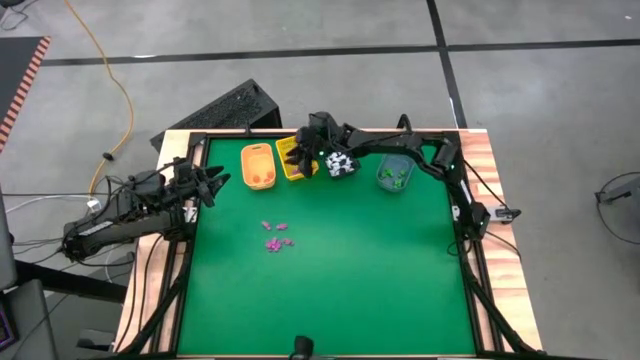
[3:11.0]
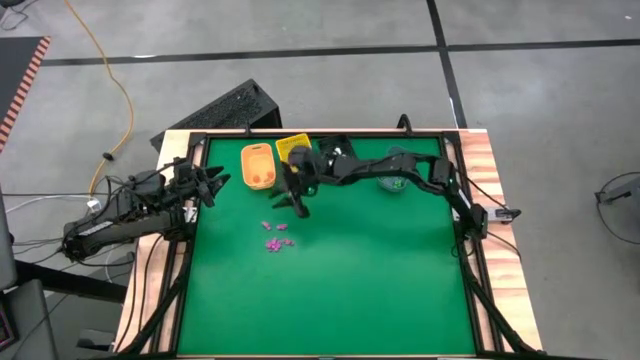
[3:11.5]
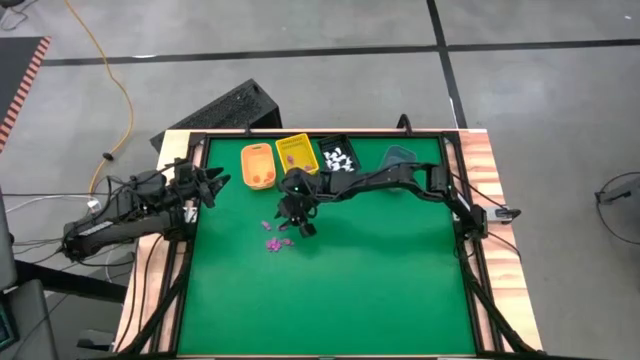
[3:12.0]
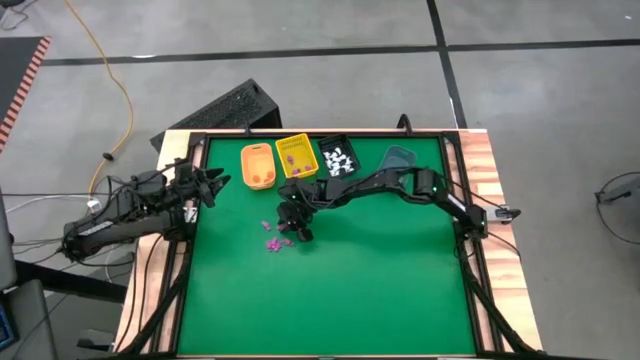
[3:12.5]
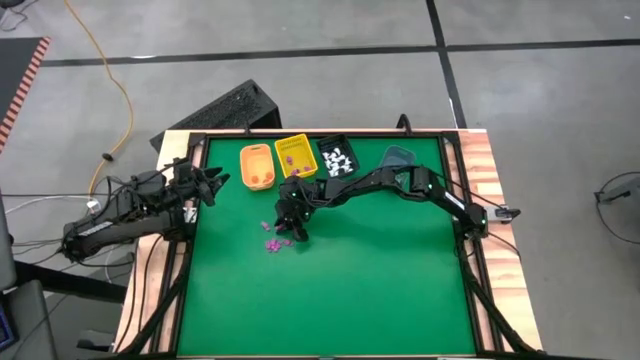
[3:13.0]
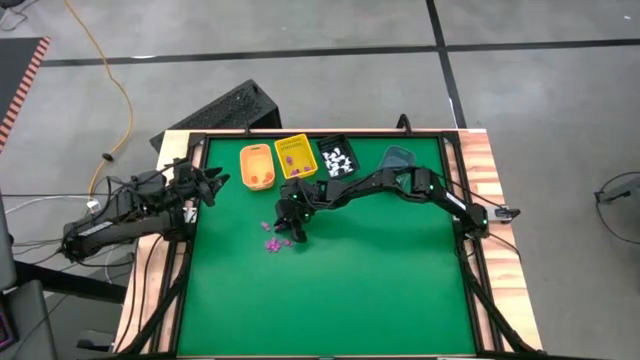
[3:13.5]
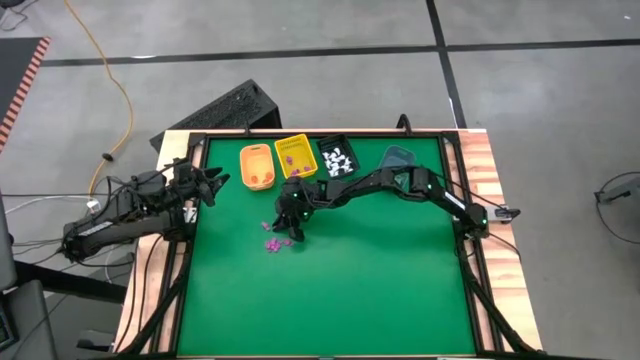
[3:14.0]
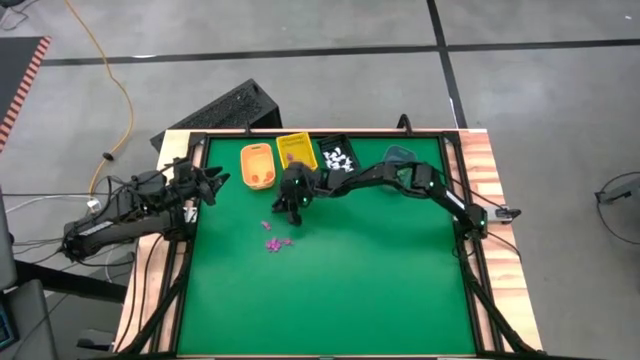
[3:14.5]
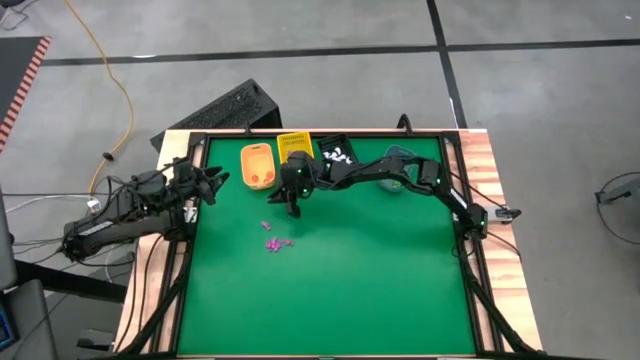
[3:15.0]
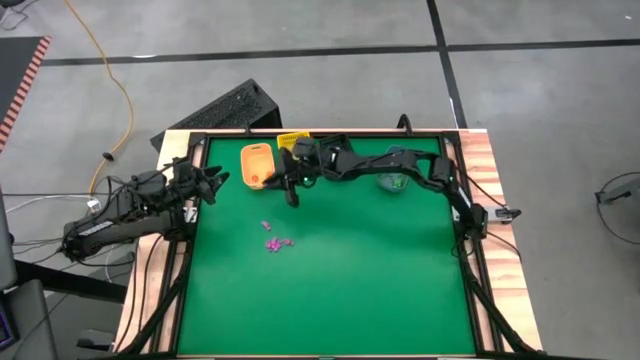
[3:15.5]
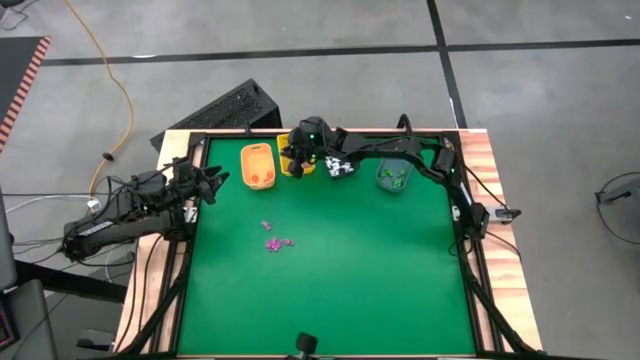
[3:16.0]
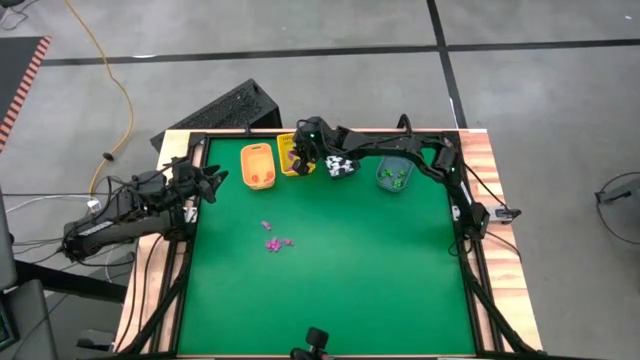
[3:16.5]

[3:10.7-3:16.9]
Task: Sort Halloween decoration
Put the pink skeleton toy into the yellow bin

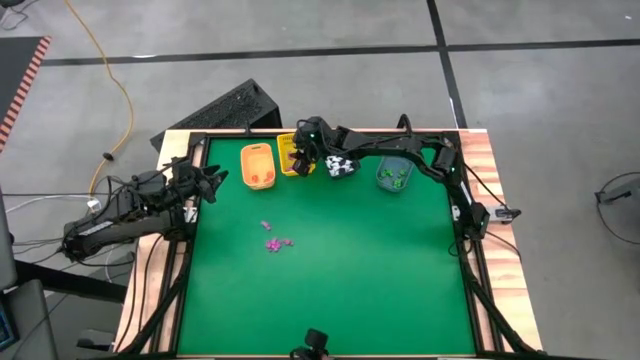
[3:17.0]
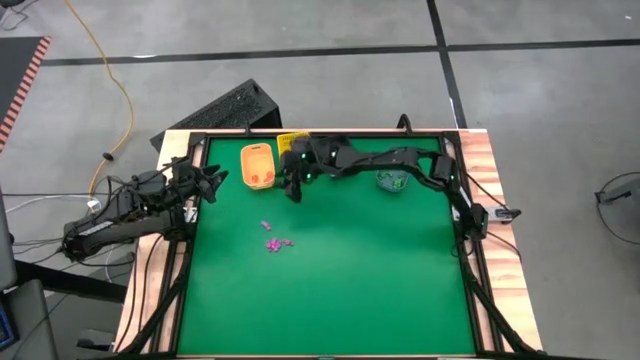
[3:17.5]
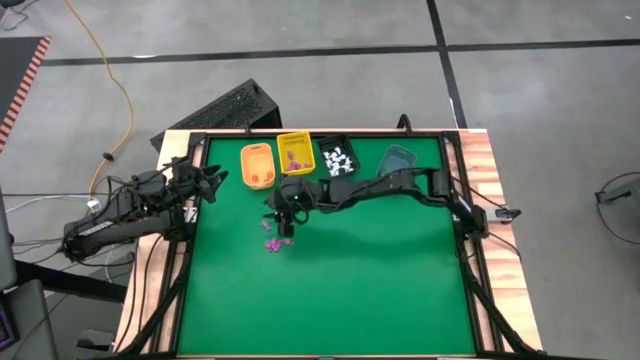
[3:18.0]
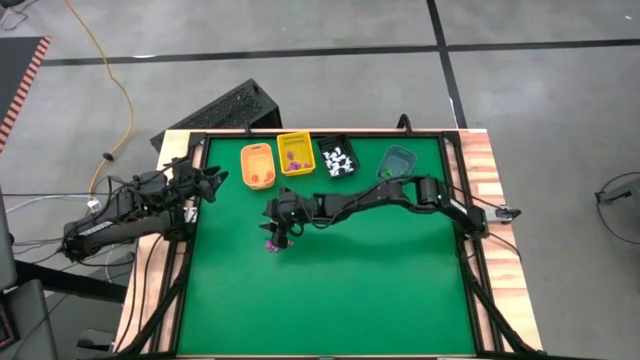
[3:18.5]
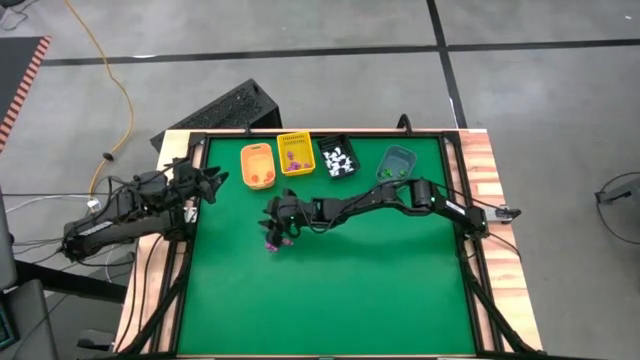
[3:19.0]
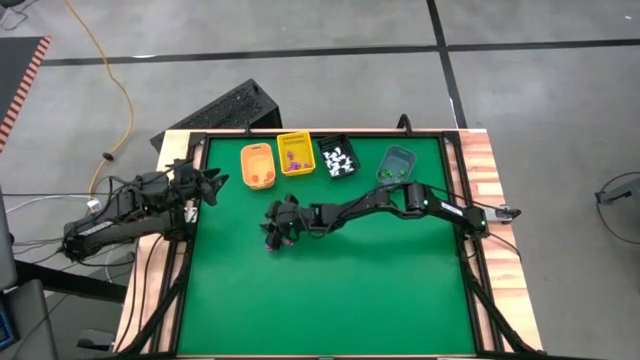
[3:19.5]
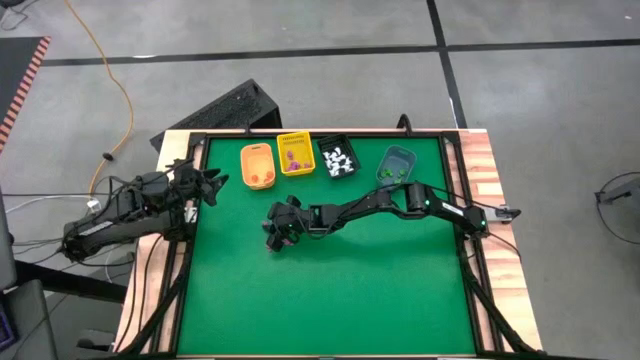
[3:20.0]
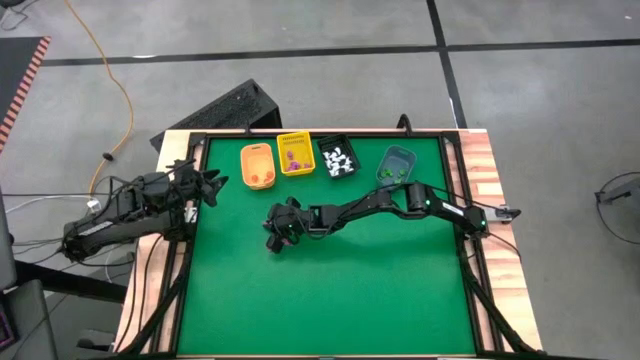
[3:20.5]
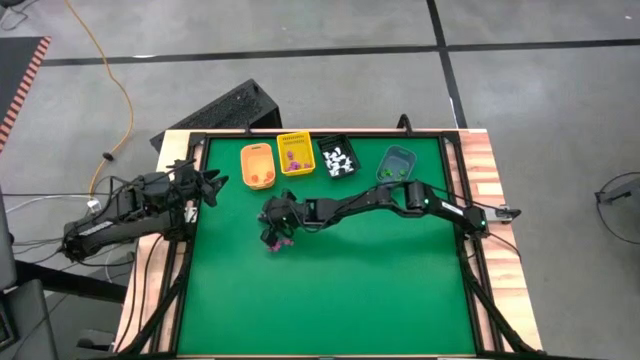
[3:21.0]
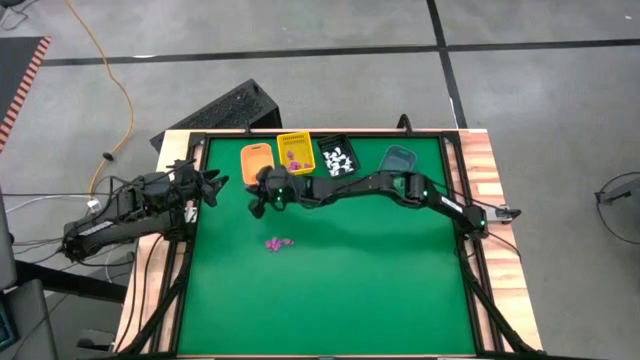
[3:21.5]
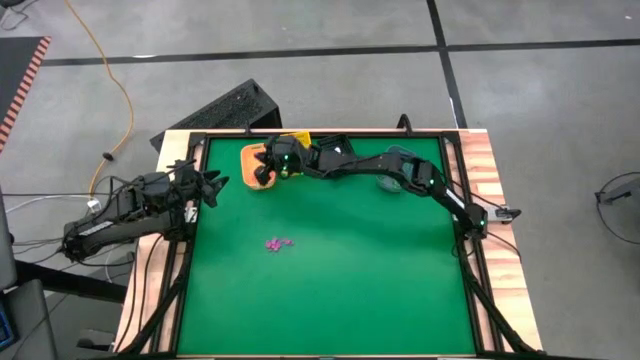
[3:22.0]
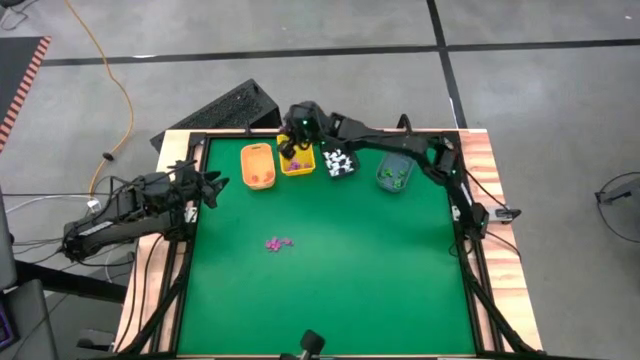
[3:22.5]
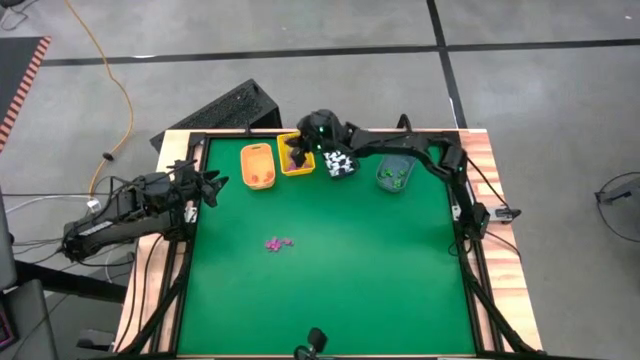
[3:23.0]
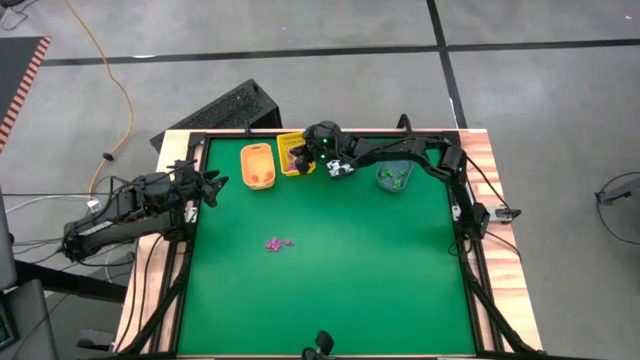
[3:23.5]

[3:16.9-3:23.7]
Put the pink skeleton toy into the yellow bin

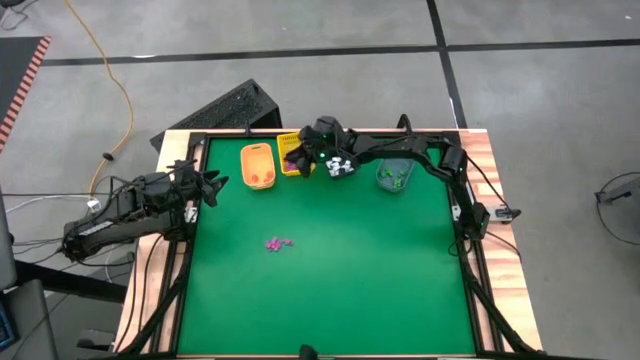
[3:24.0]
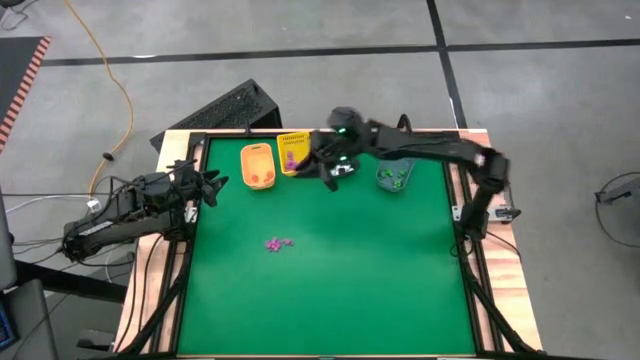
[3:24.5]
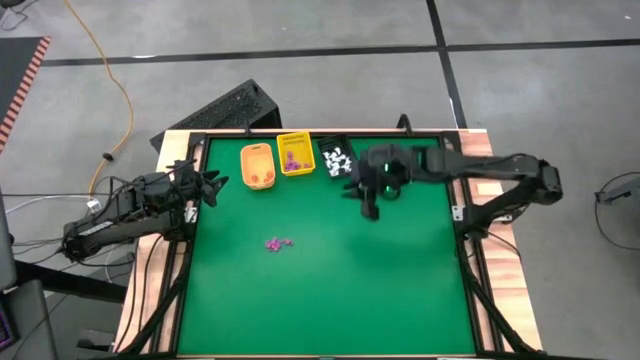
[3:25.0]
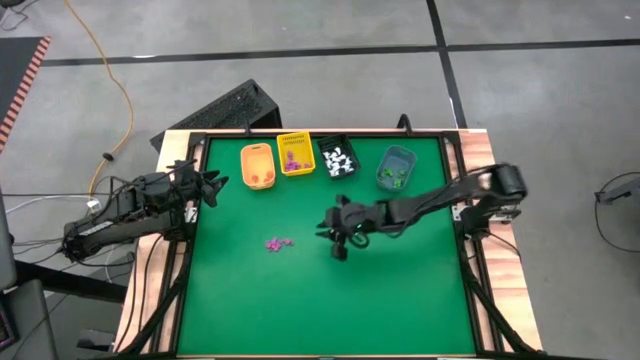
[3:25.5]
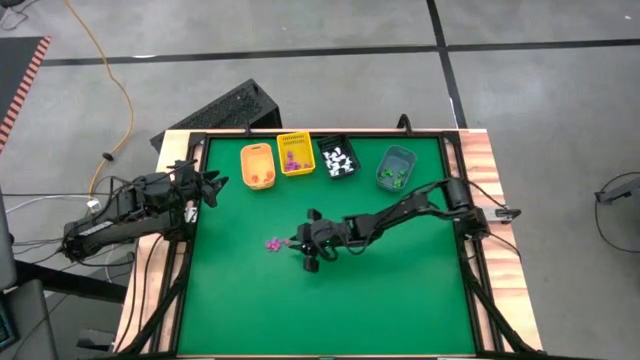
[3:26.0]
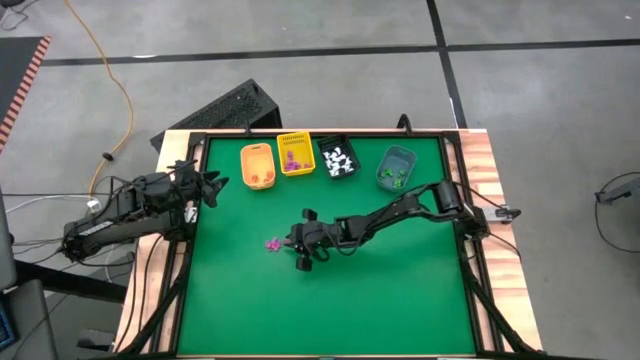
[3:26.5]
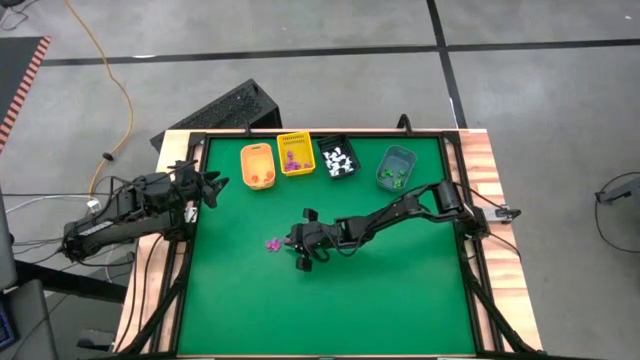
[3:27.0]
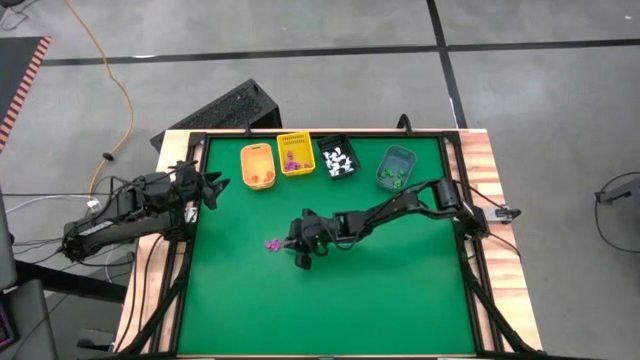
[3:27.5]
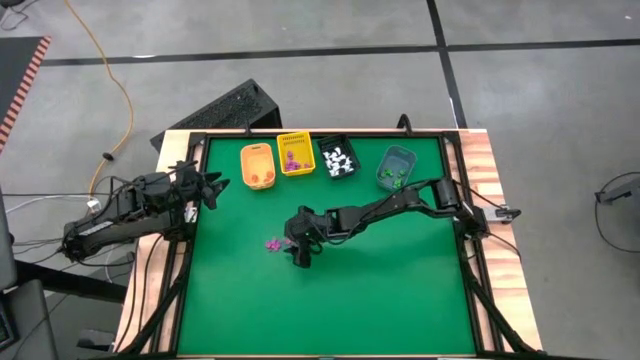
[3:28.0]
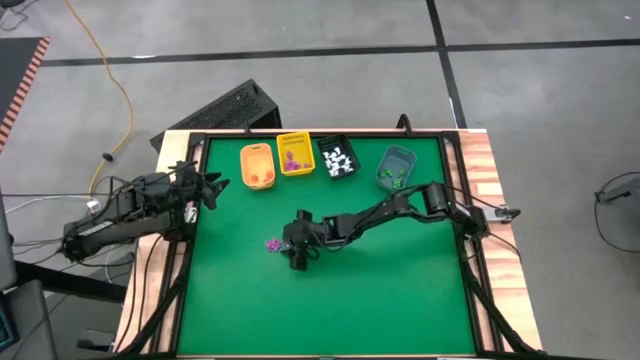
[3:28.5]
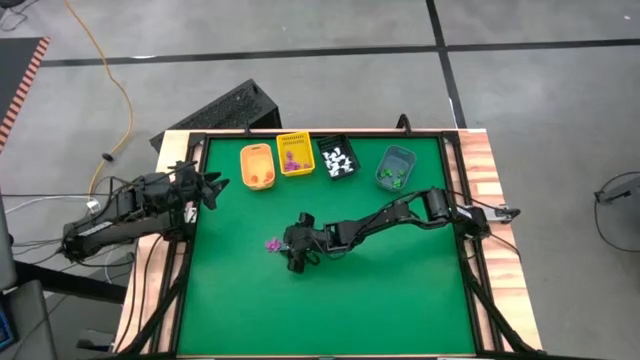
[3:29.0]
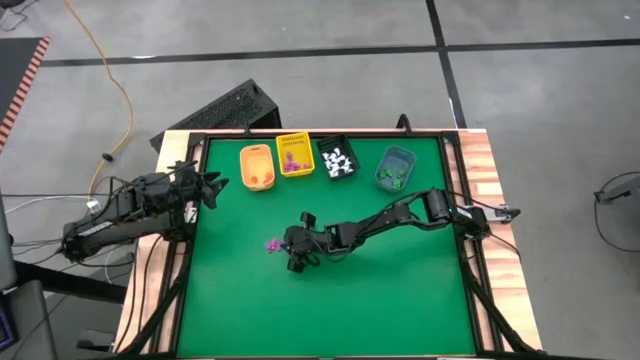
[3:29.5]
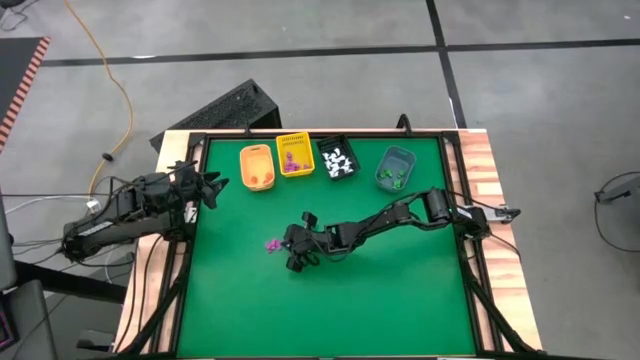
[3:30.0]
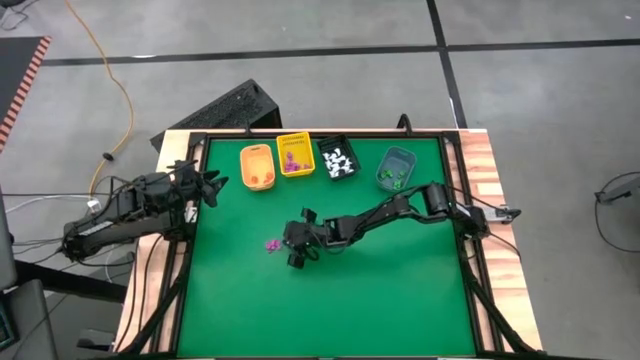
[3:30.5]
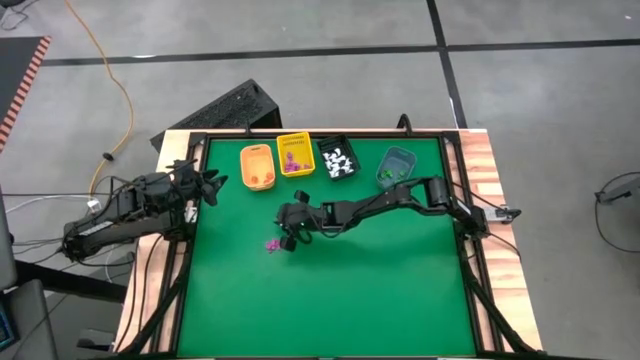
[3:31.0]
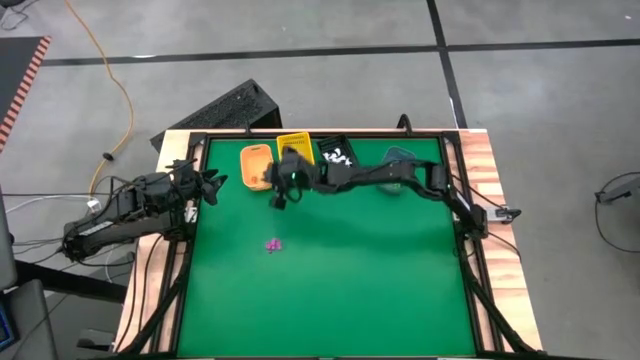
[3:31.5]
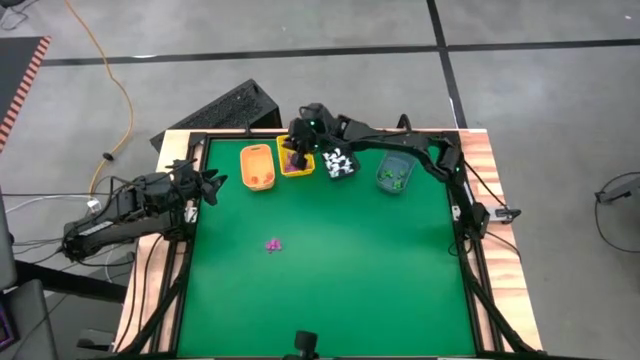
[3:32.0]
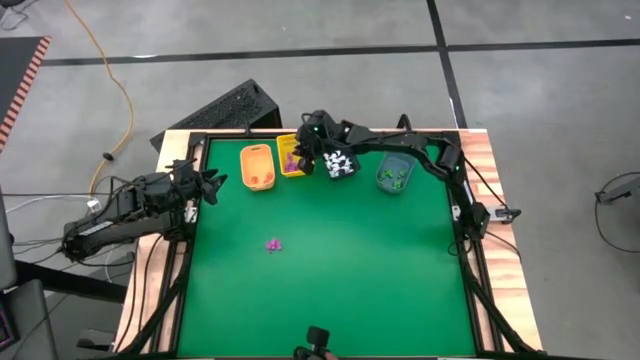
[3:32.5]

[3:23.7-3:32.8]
Put the pink skeleton toy into the yellow bin
